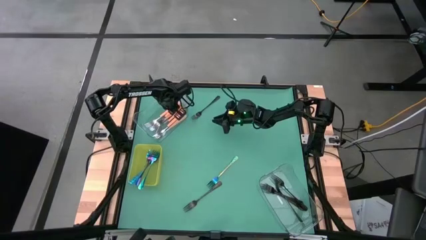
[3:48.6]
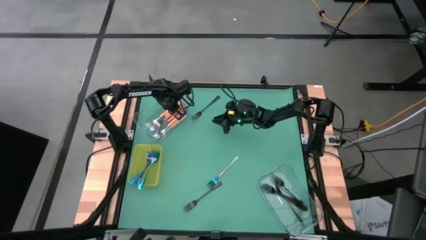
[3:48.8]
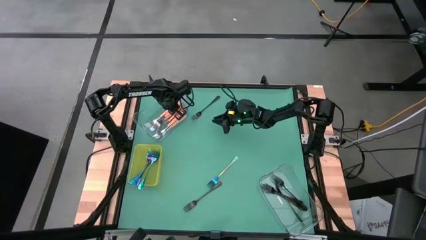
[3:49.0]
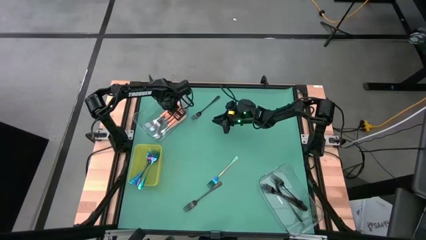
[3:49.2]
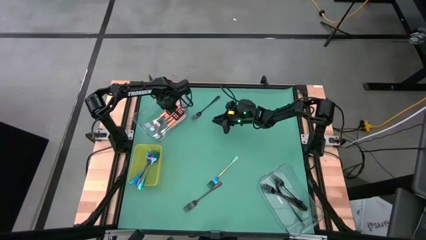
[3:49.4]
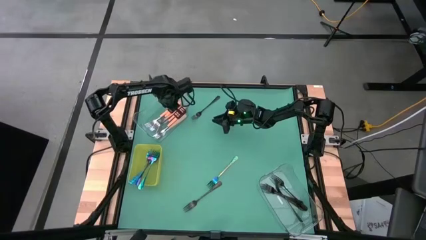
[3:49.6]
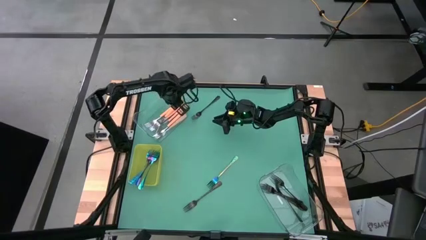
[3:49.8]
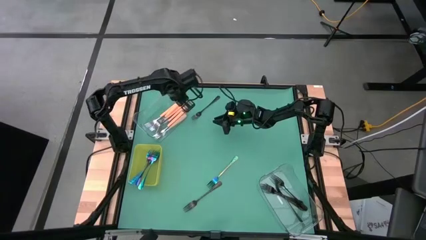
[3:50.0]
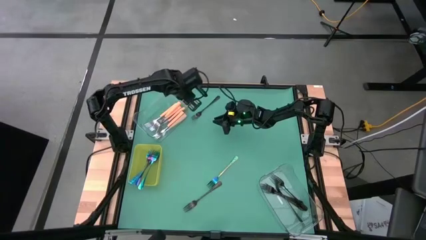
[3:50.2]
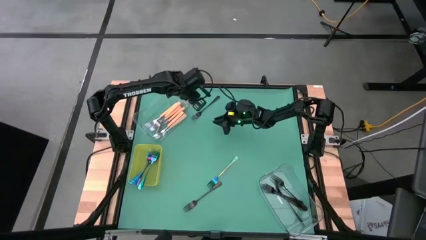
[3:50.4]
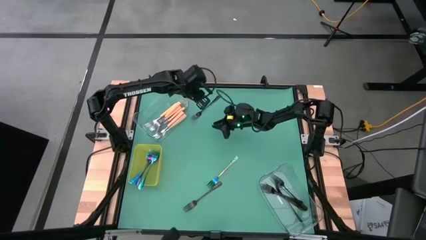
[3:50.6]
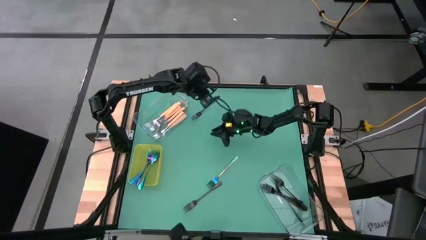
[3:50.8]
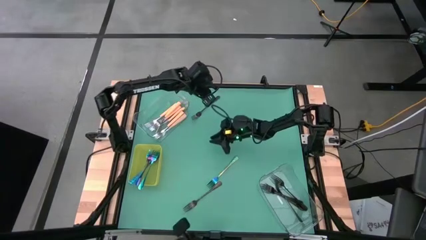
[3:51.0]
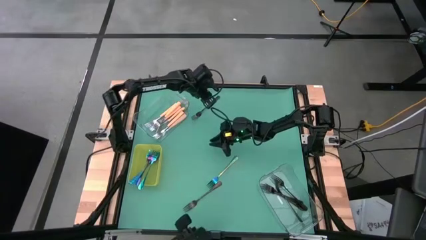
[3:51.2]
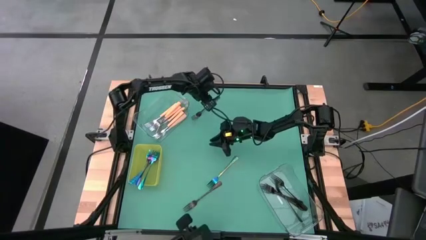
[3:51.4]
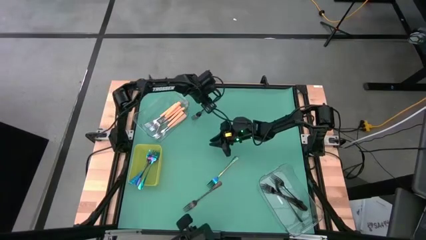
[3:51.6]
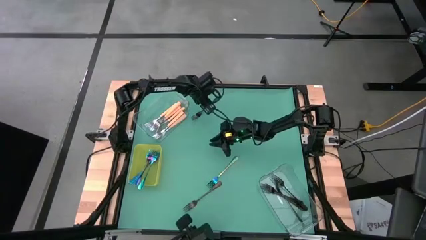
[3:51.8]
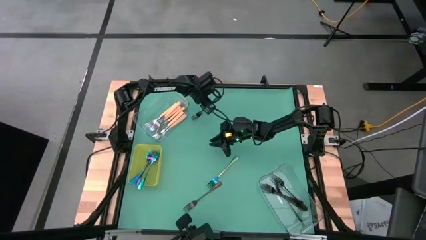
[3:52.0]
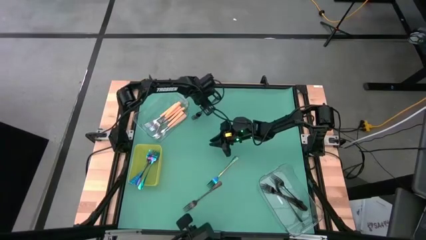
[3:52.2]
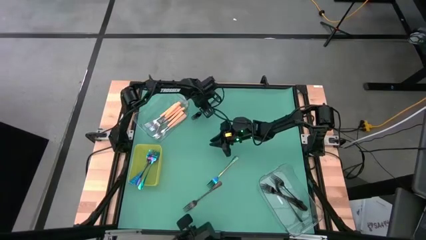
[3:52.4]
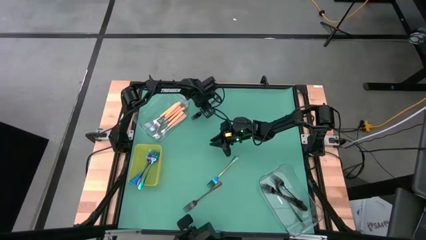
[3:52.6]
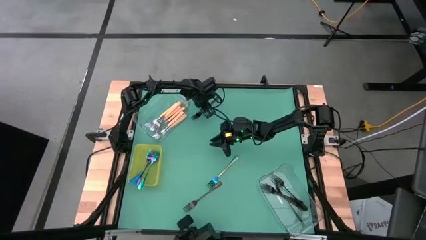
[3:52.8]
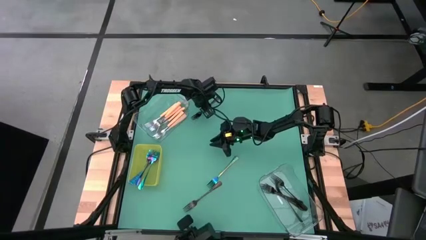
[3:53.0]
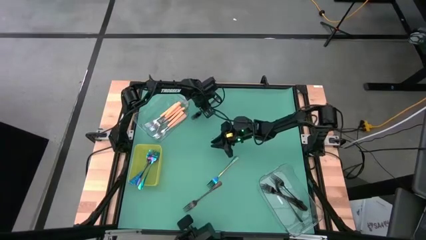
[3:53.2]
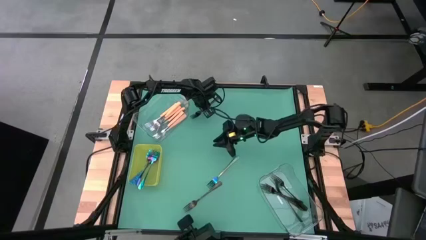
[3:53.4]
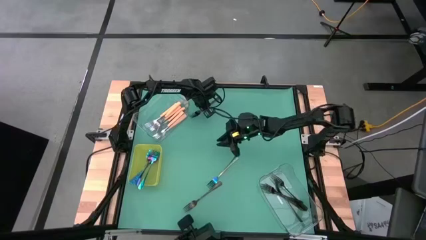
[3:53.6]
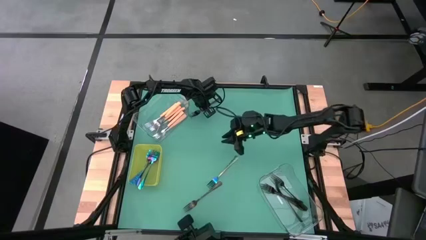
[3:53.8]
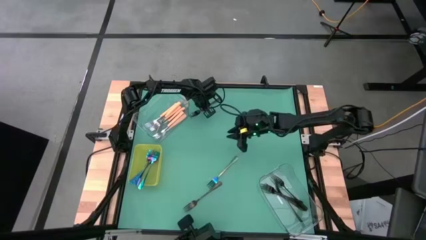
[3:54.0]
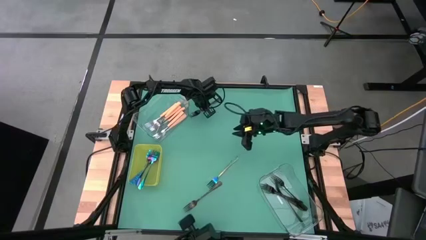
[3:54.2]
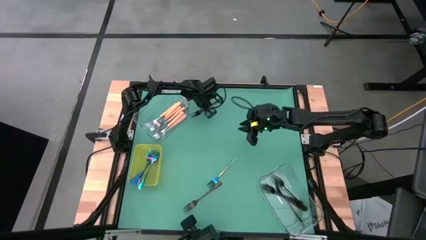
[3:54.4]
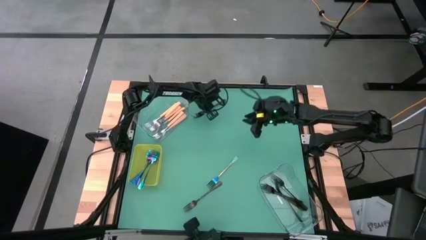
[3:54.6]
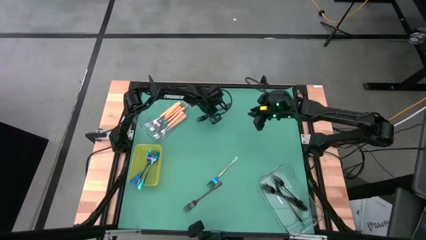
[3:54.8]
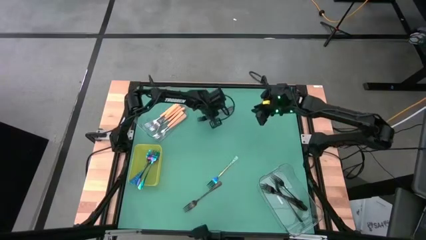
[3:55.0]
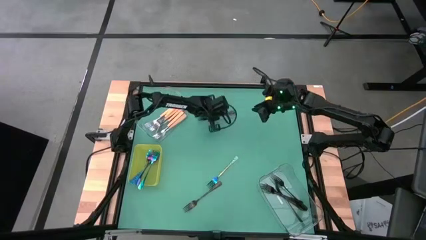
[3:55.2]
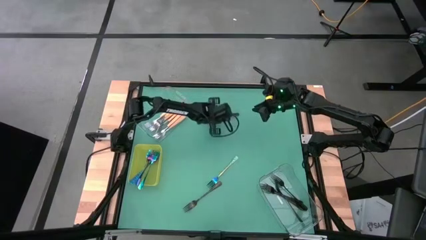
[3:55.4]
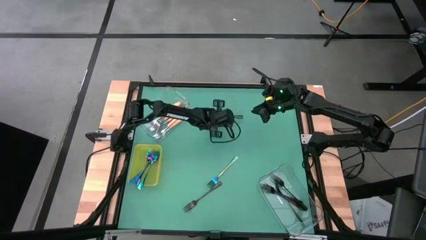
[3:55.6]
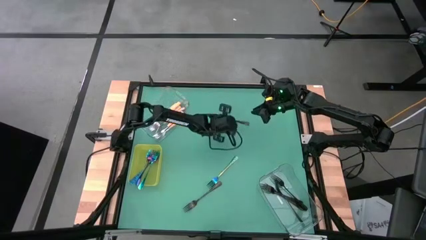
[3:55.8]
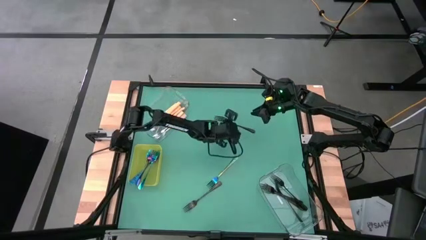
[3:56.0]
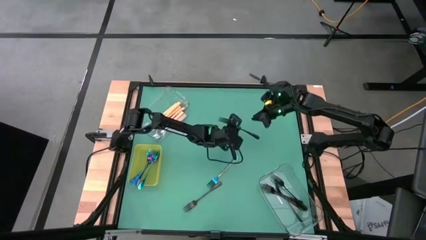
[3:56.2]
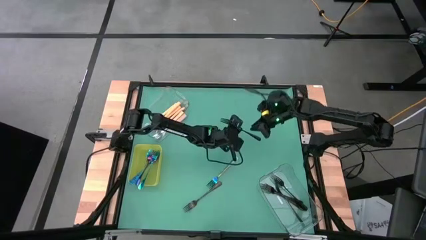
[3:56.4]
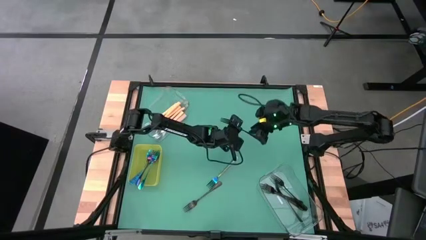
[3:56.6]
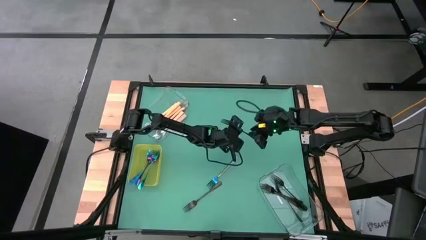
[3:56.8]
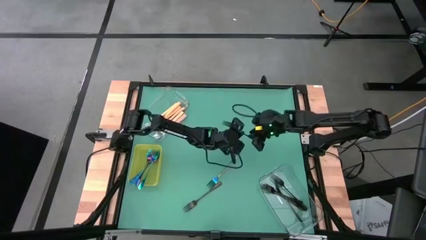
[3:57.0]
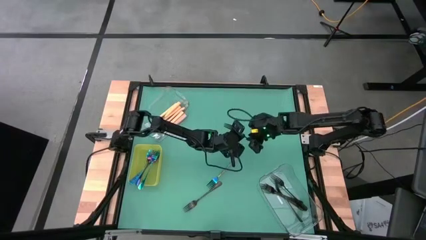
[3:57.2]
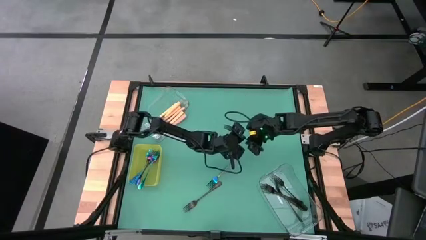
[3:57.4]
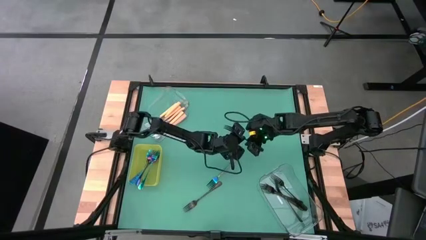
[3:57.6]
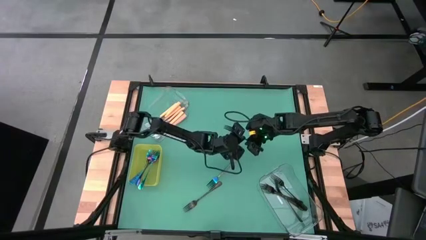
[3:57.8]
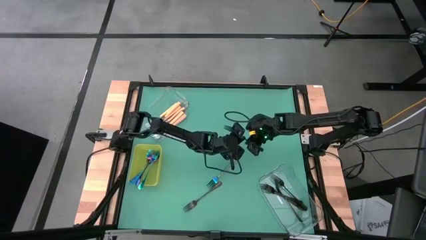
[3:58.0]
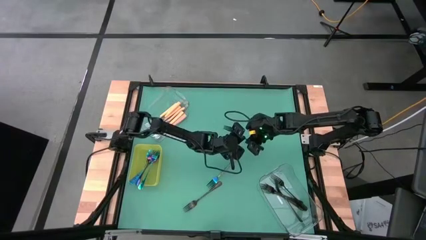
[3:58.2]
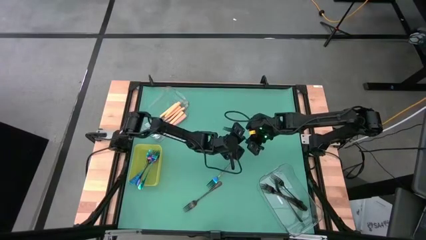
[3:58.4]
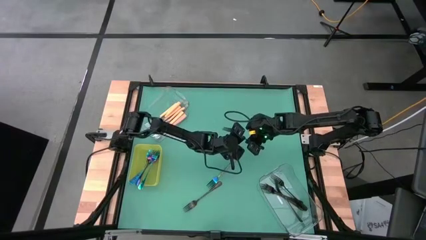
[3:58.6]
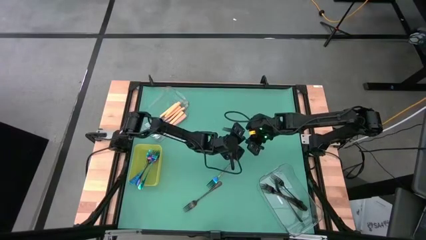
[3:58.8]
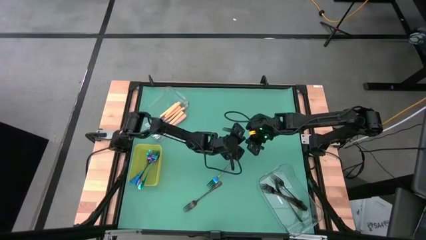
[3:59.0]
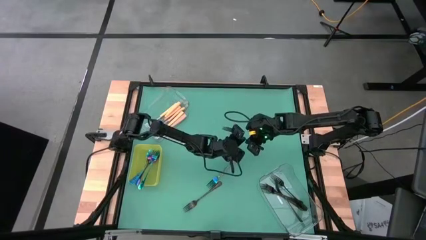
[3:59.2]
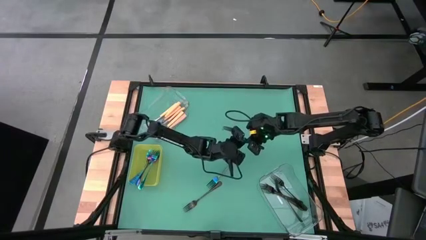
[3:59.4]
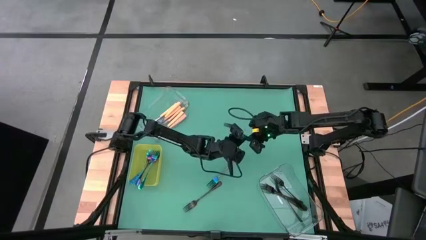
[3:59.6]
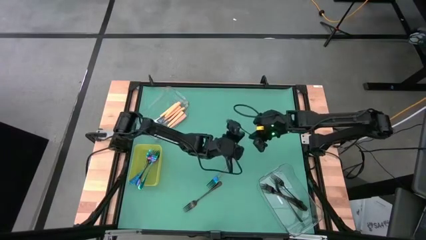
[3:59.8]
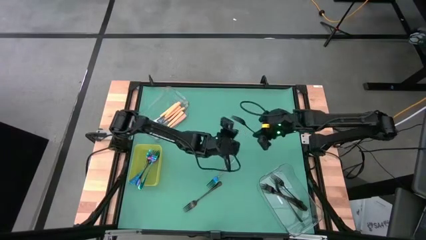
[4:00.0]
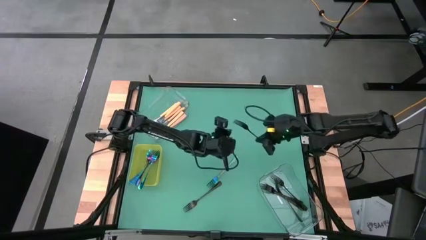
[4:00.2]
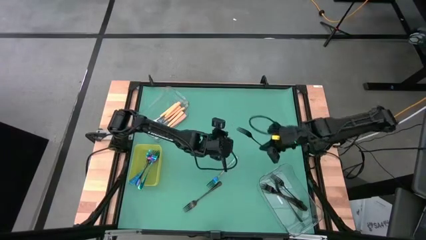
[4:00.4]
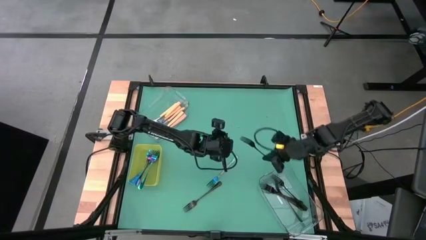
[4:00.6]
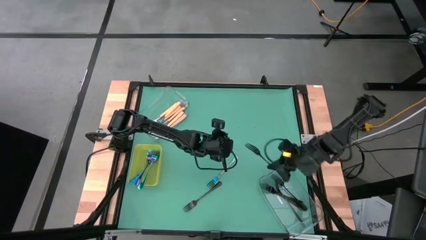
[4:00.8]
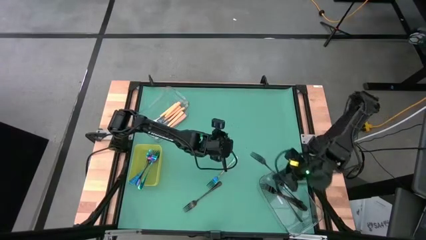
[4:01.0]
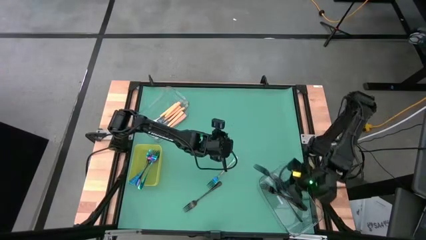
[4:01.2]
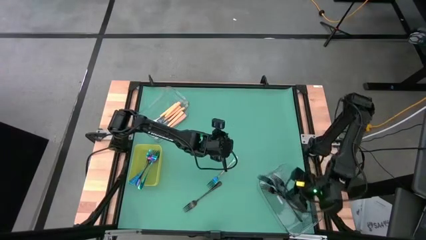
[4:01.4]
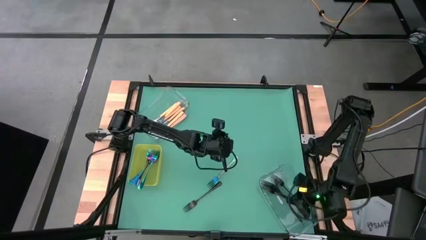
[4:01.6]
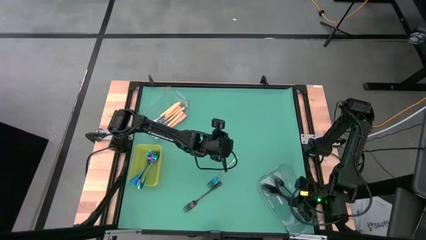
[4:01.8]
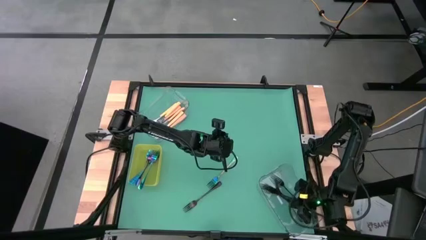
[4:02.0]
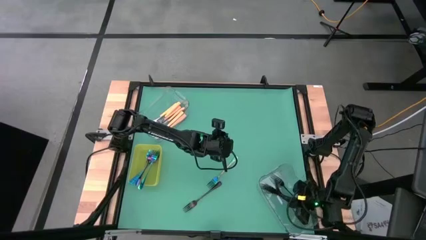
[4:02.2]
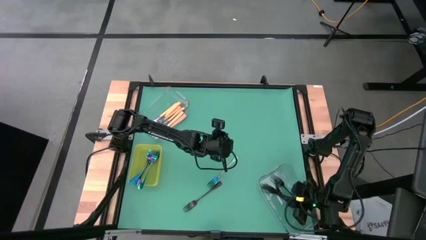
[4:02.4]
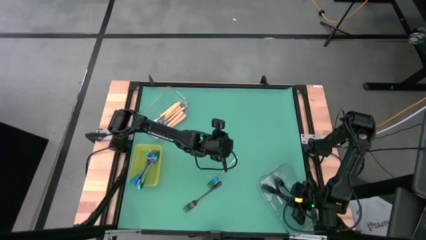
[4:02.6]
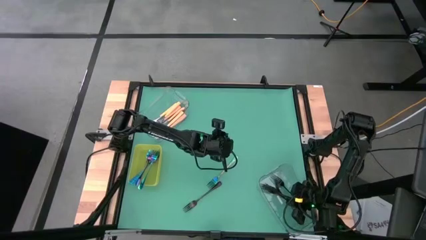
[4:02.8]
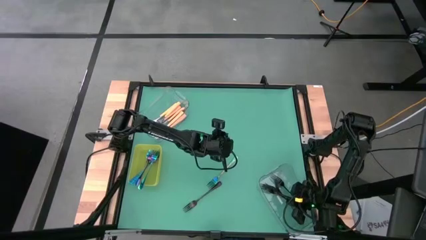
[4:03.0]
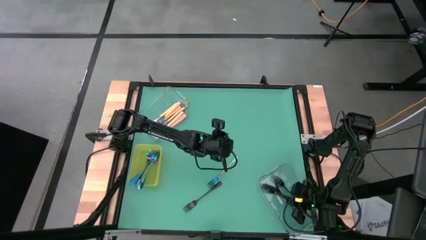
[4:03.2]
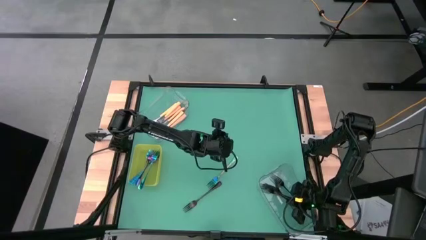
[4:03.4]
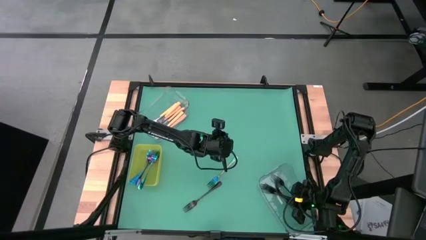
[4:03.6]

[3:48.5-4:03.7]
Task: Sort silverware by color (type)
Put the black fork in the bottom transparent bin
